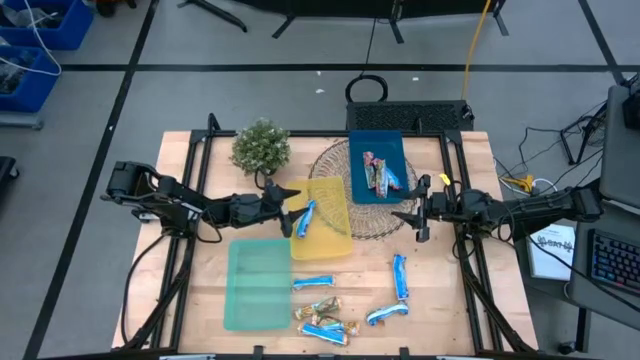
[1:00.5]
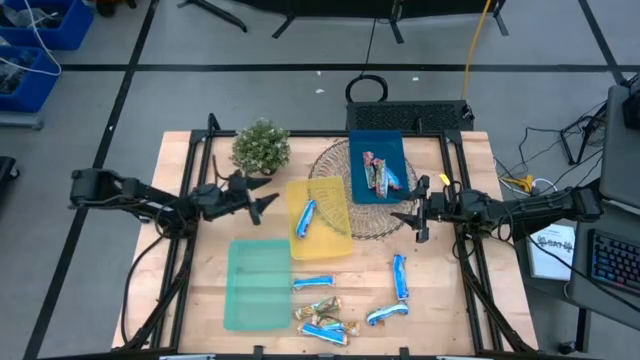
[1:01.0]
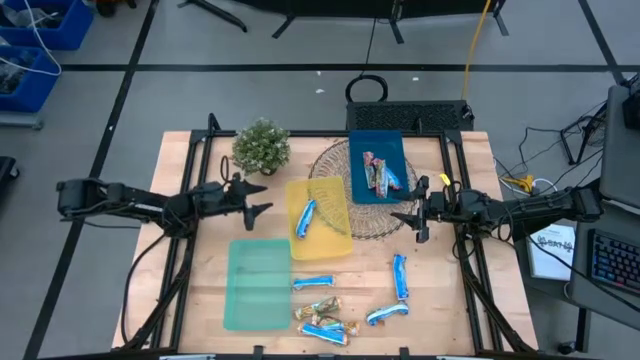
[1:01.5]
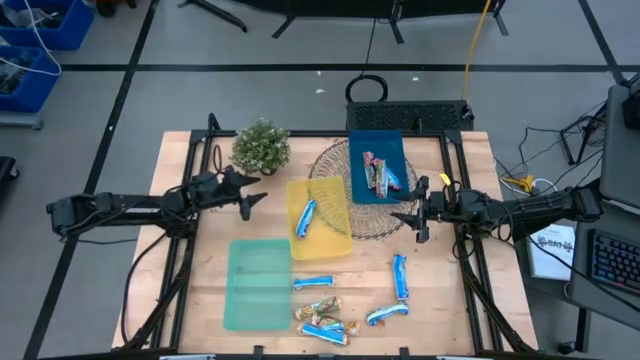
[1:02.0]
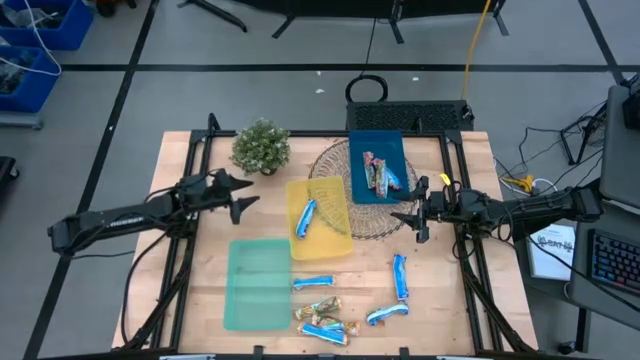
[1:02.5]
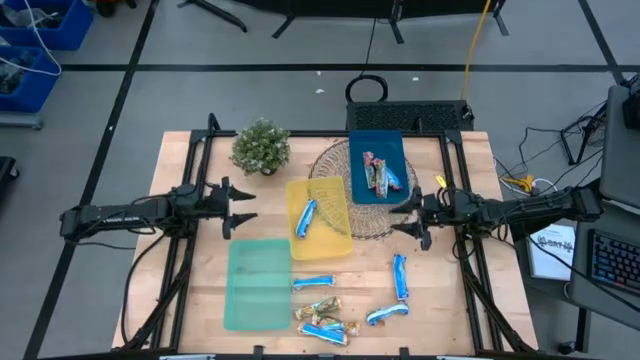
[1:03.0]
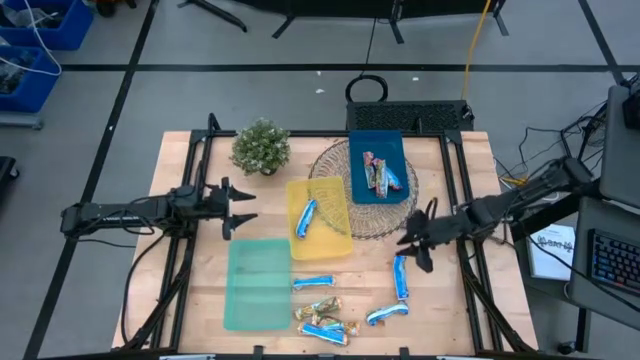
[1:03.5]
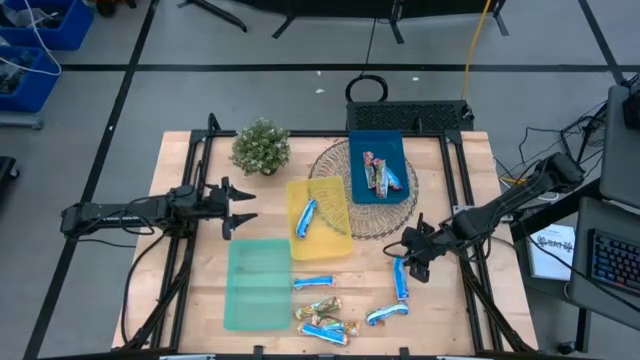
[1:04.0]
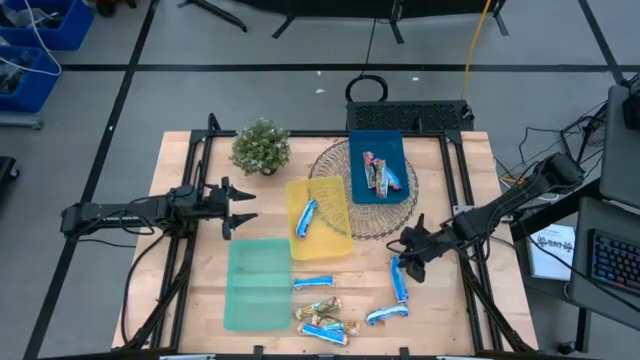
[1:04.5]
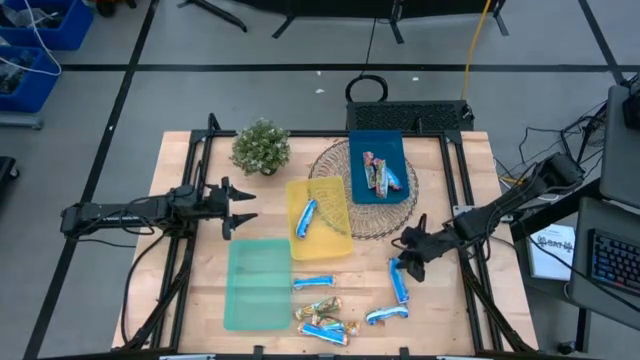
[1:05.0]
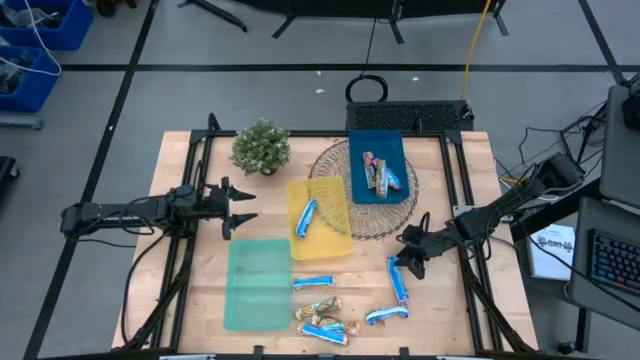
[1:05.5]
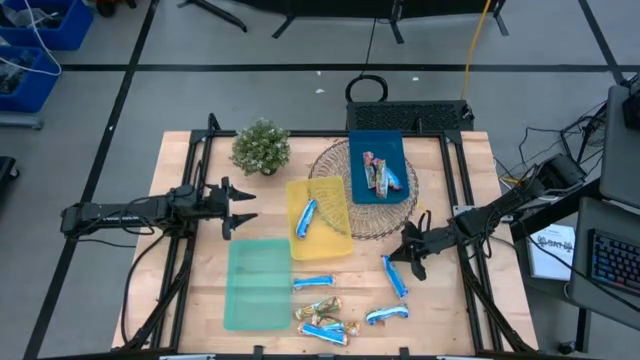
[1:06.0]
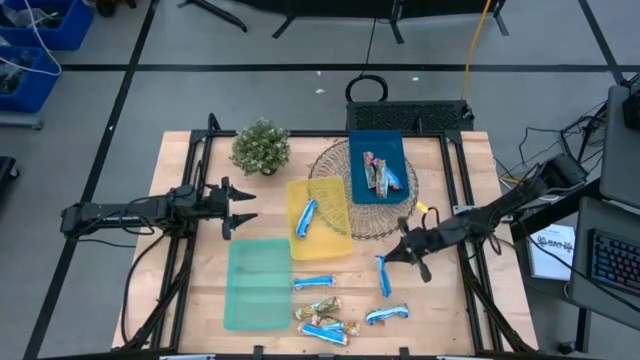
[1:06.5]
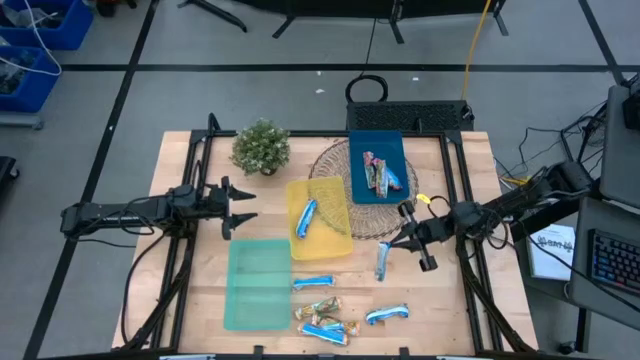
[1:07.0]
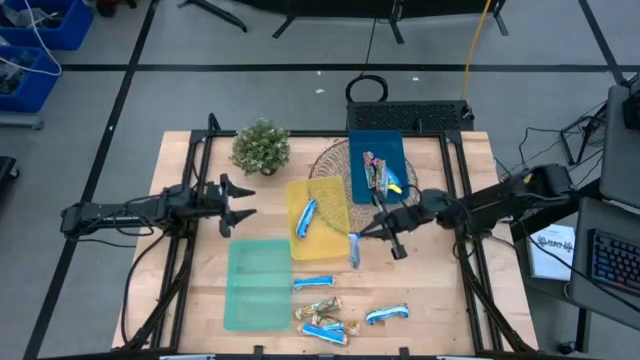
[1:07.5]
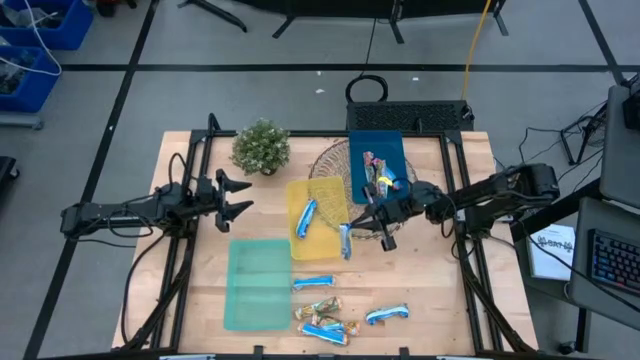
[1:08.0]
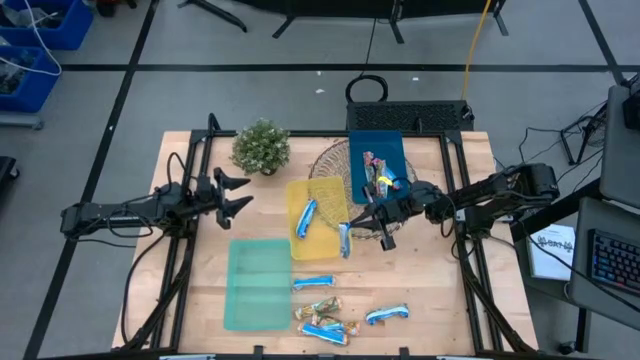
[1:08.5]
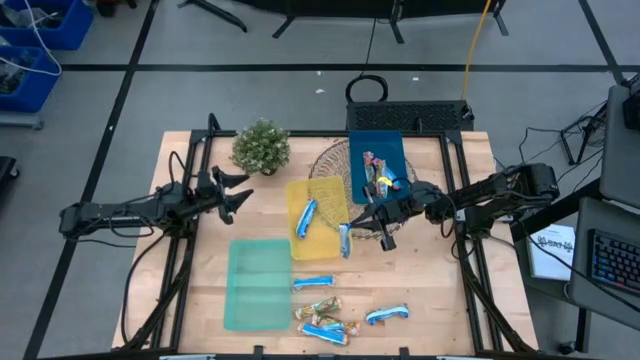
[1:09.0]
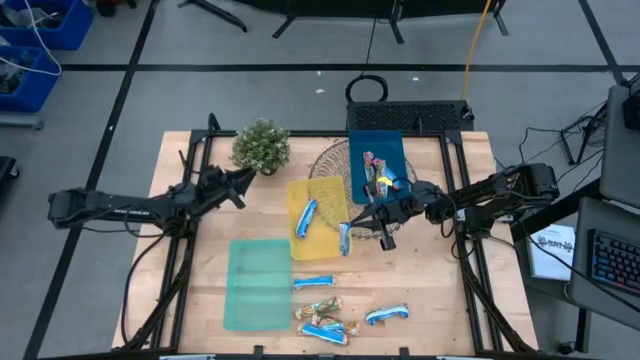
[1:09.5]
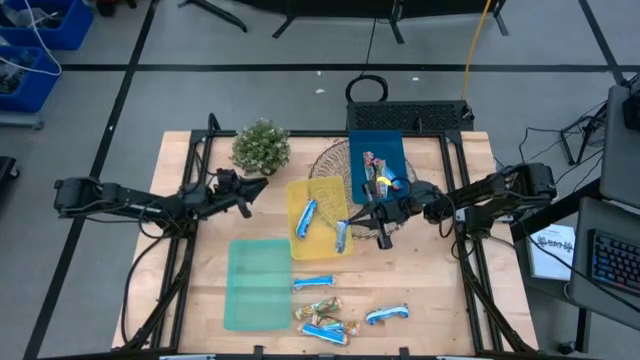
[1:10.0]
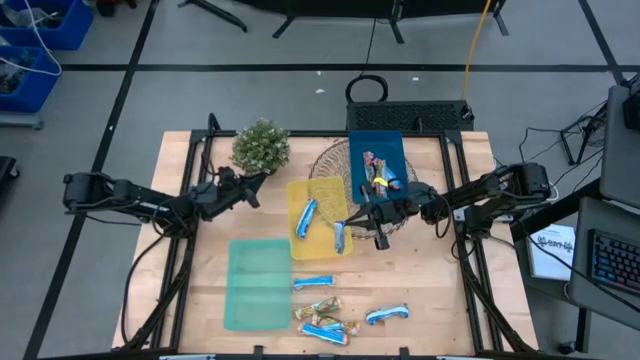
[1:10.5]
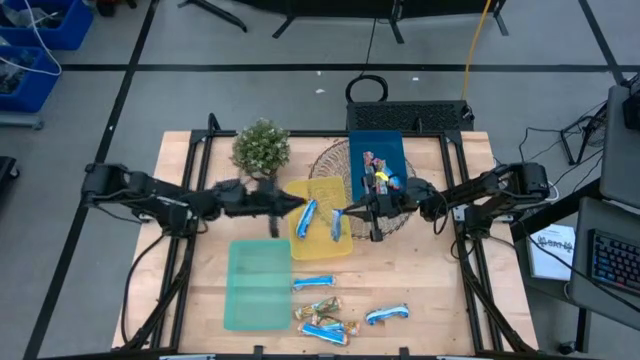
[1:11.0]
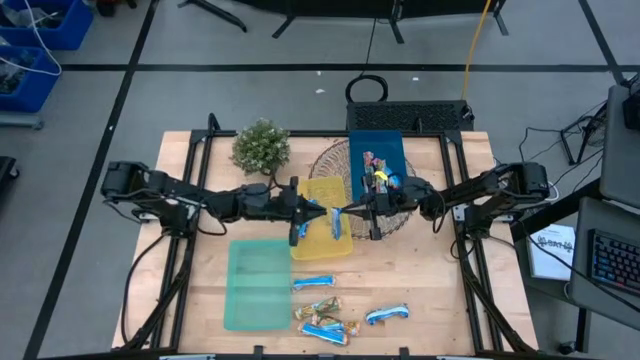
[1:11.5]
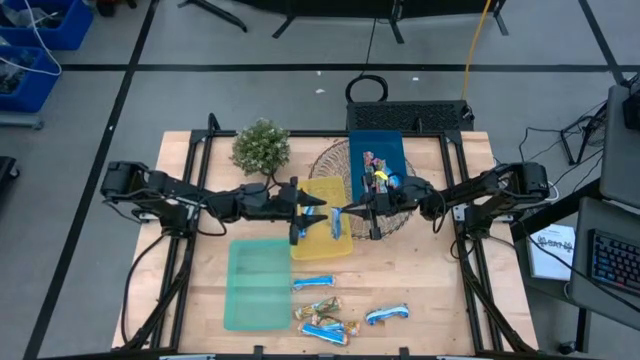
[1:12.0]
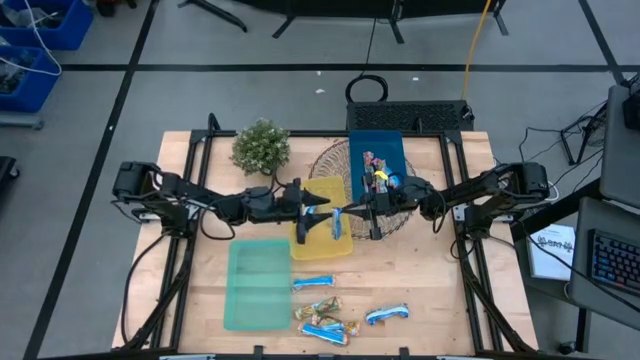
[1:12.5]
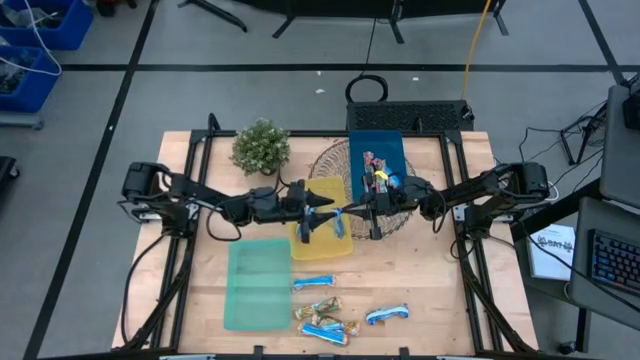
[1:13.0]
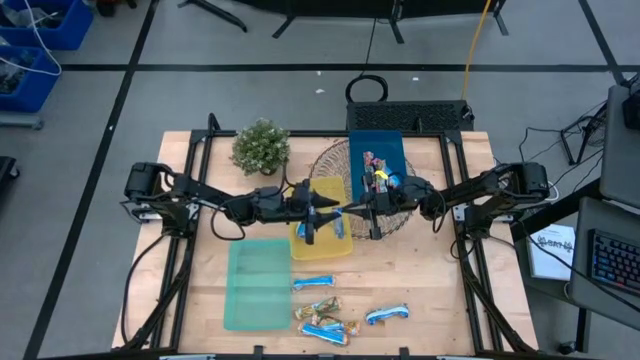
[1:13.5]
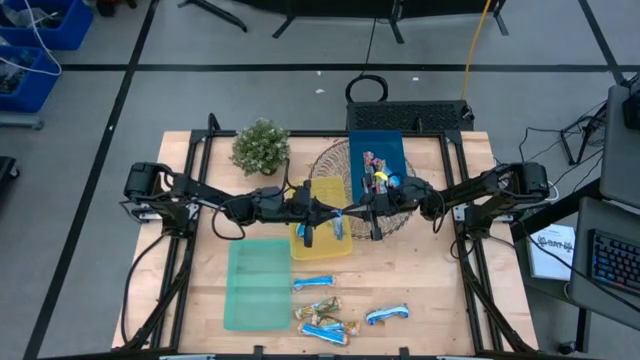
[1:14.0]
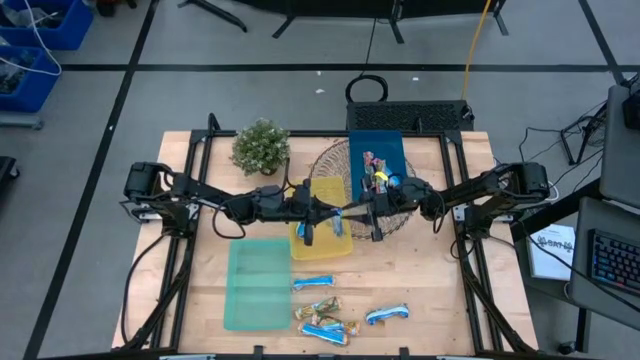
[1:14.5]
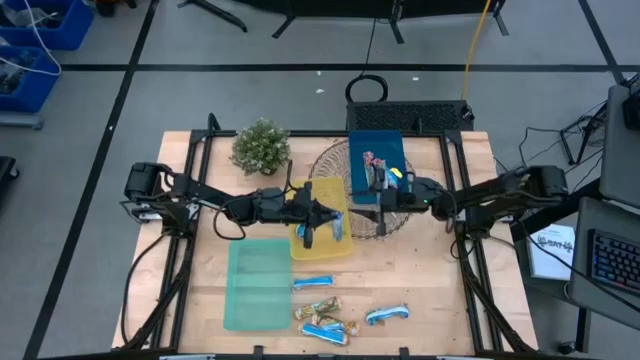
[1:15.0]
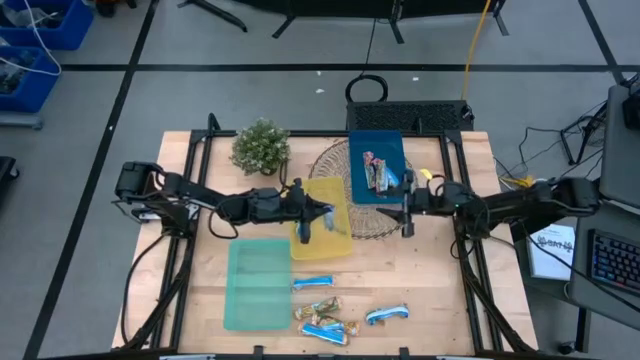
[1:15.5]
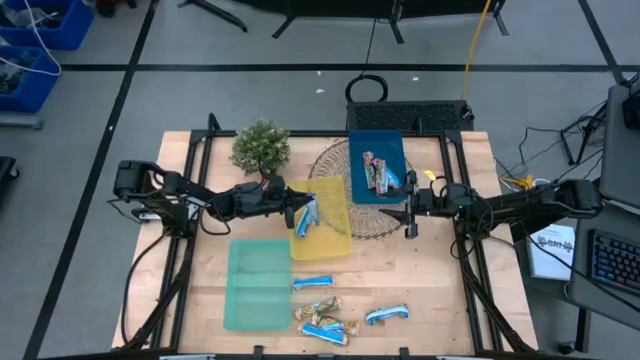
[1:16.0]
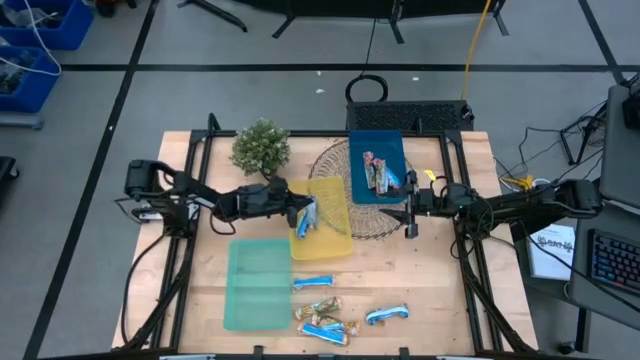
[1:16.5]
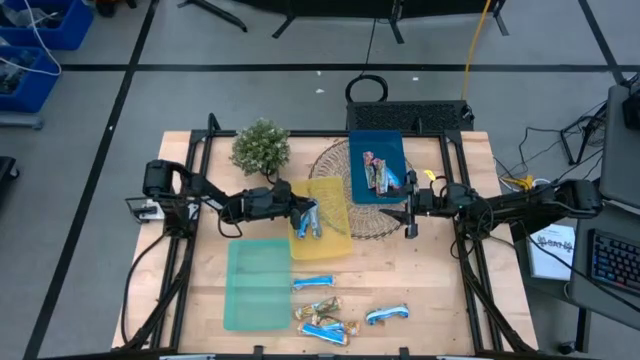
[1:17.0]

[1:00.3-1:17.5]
Task: Pick and place Granola Bars by type
Put the blue granola bar into the yellow bin

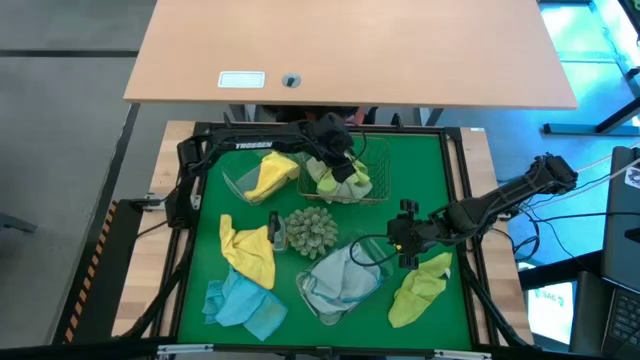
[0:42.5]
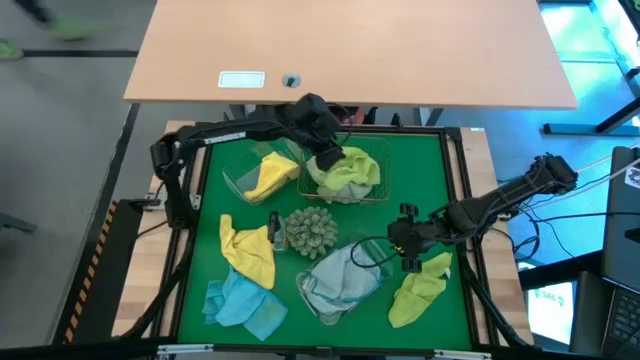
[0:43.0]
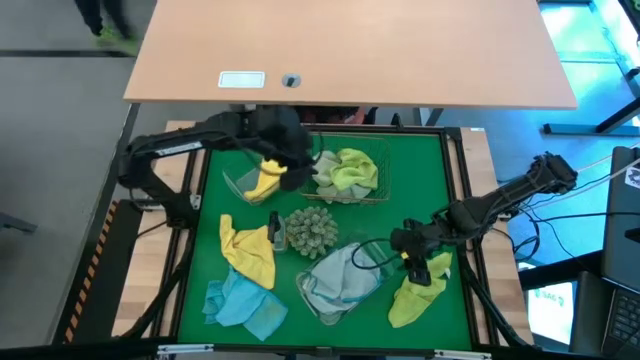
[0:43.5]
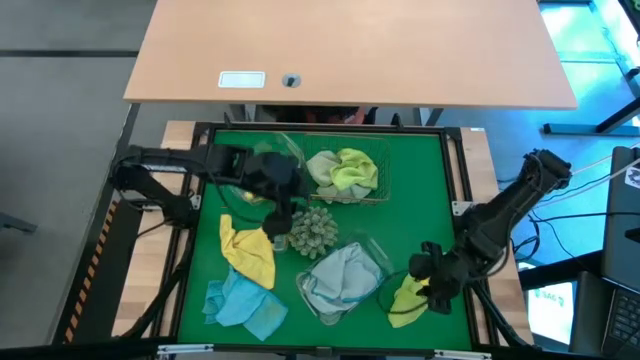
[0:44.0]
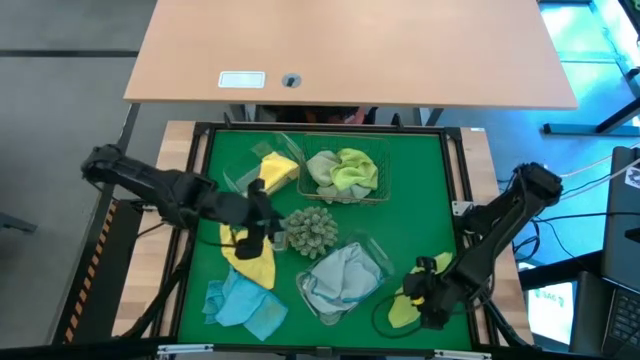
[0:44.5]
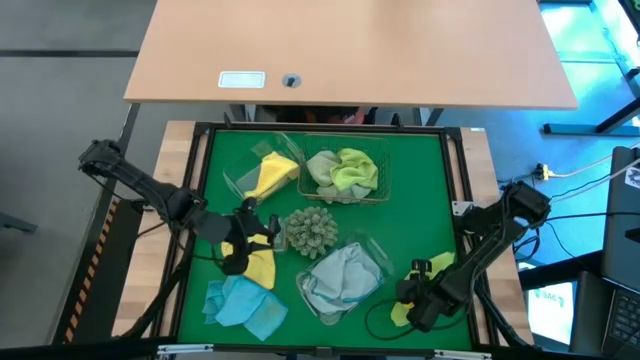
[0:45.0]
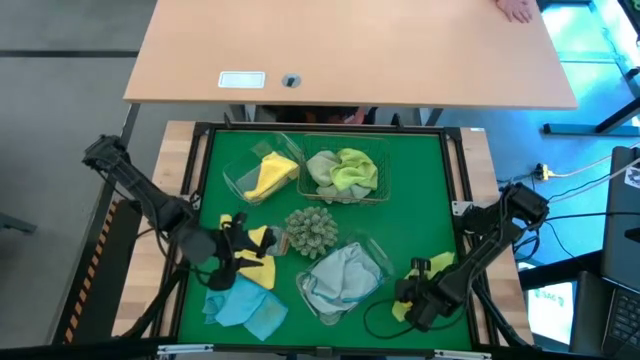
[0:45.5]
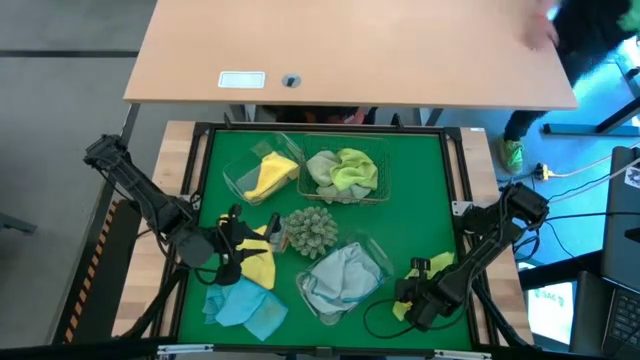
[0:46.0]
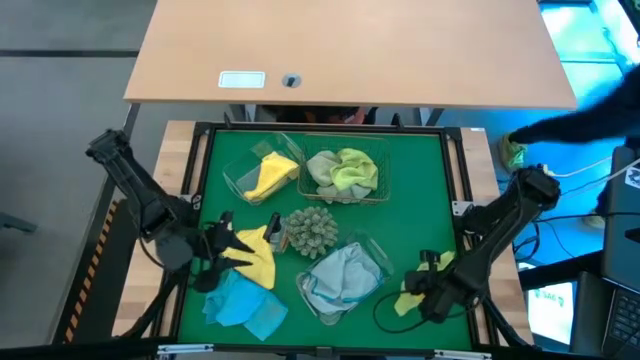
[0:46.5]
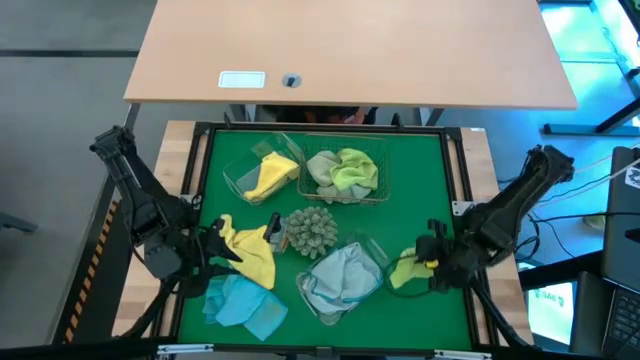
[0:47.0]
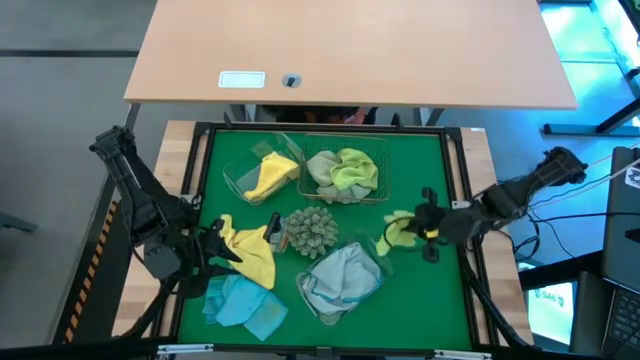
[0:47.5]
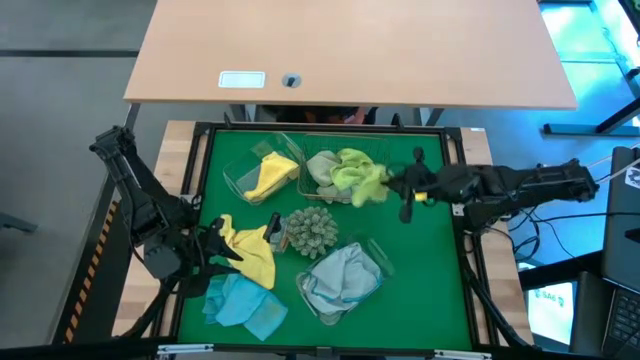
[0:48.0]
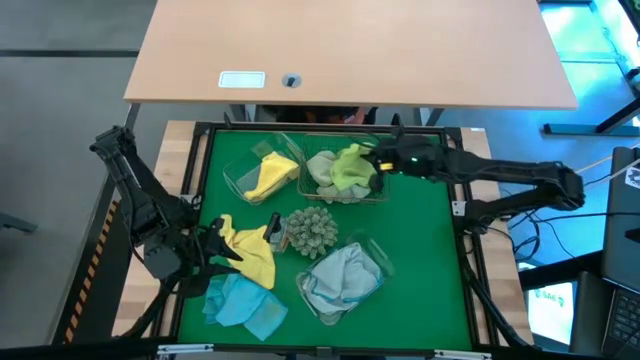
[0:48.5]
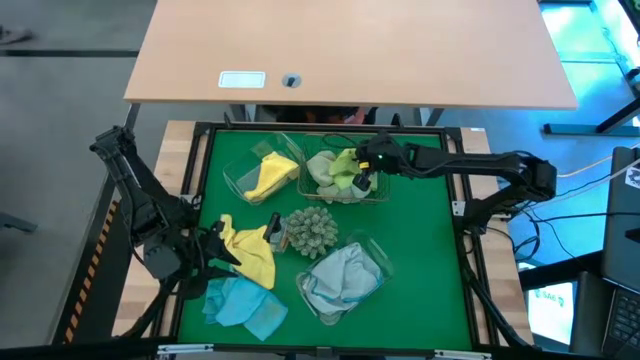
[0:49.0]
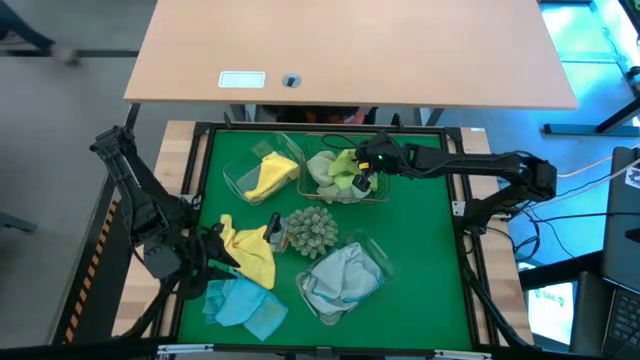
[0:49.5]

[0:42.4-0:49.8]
Task: Sort microfiber towel by color & place in baskets
Put the green microfiber towel into the wire basket
